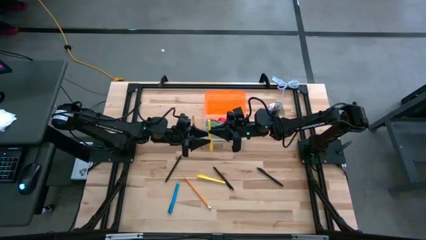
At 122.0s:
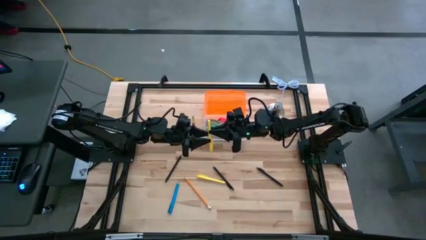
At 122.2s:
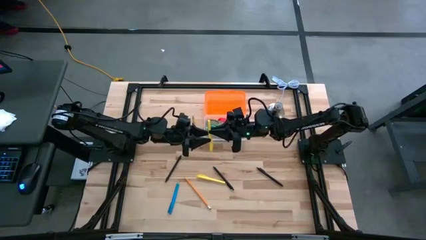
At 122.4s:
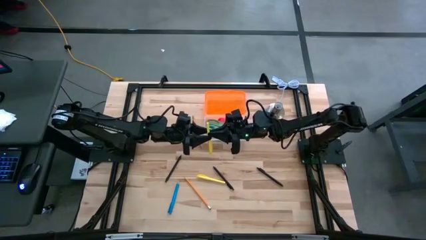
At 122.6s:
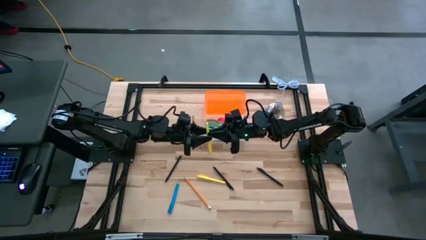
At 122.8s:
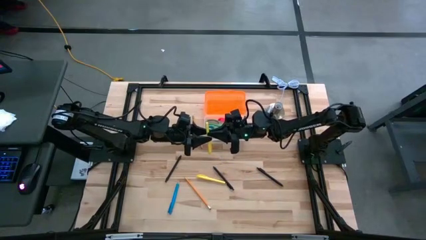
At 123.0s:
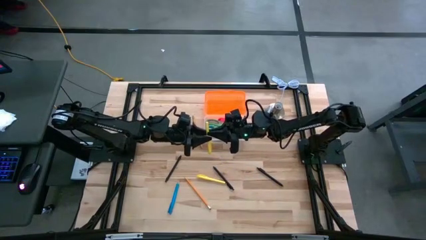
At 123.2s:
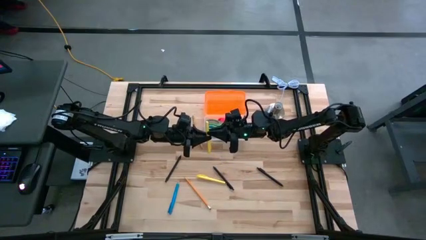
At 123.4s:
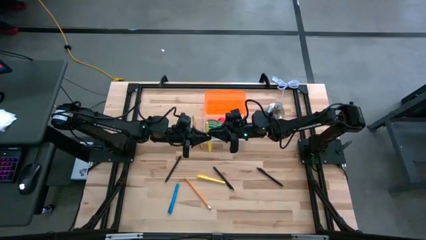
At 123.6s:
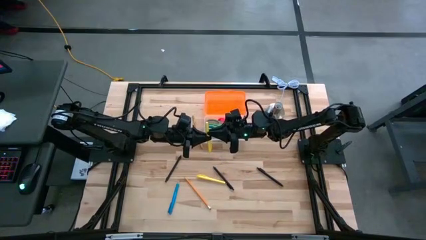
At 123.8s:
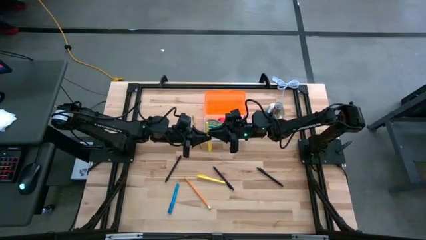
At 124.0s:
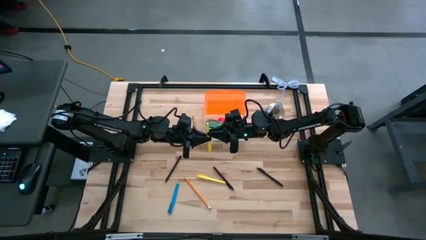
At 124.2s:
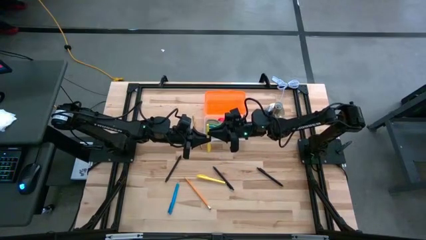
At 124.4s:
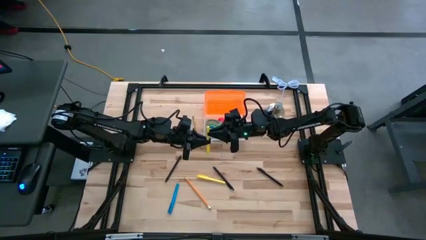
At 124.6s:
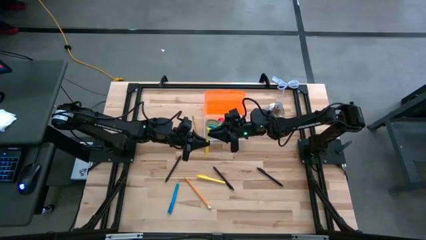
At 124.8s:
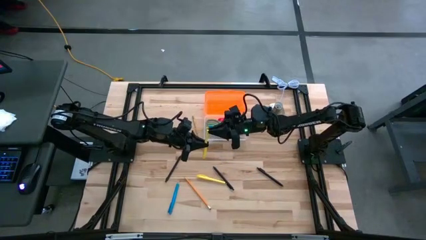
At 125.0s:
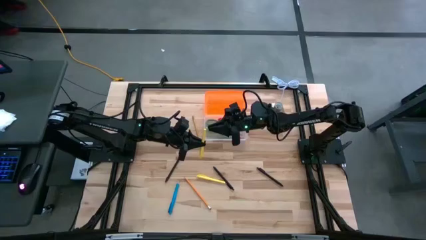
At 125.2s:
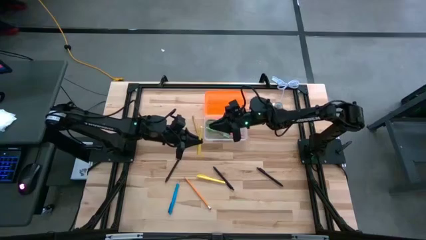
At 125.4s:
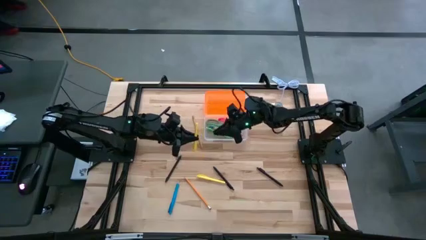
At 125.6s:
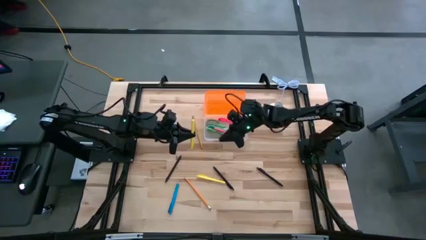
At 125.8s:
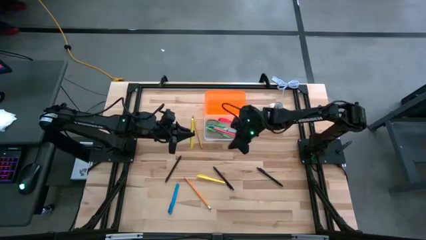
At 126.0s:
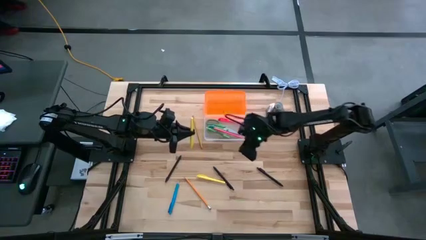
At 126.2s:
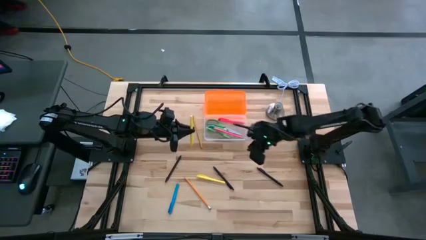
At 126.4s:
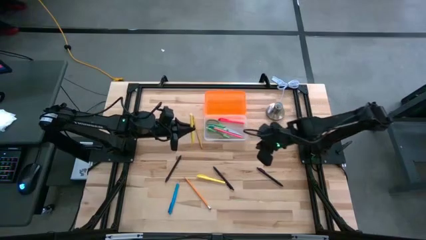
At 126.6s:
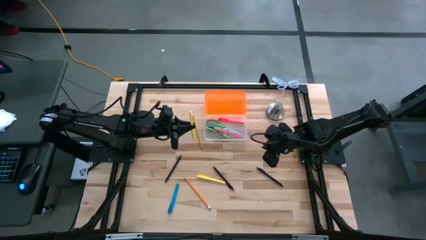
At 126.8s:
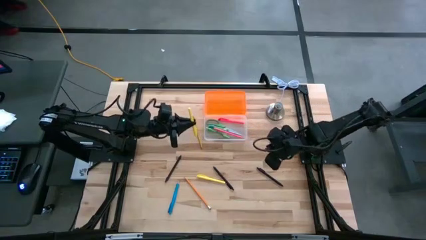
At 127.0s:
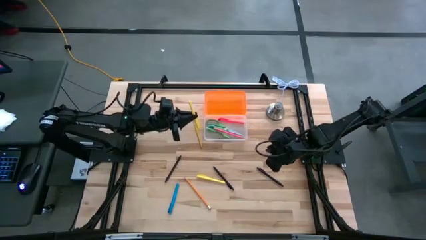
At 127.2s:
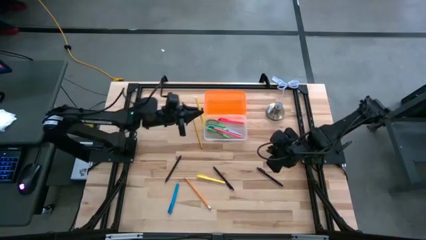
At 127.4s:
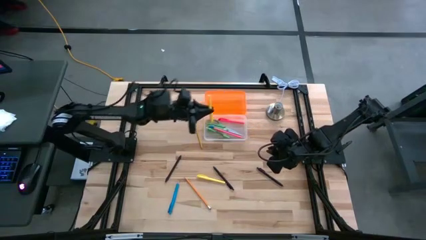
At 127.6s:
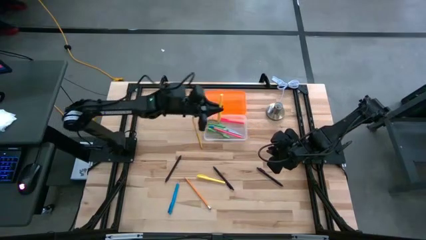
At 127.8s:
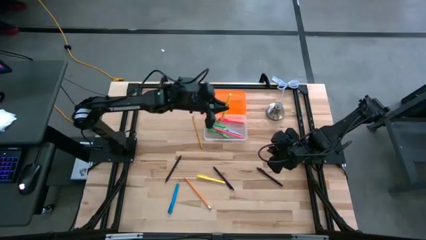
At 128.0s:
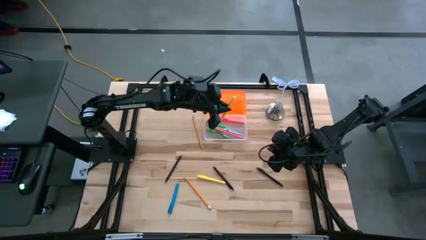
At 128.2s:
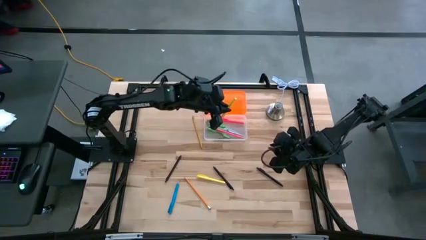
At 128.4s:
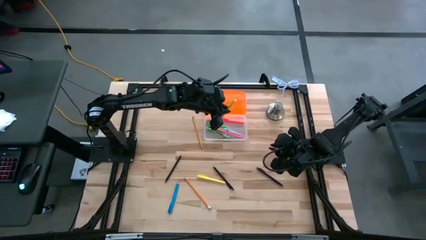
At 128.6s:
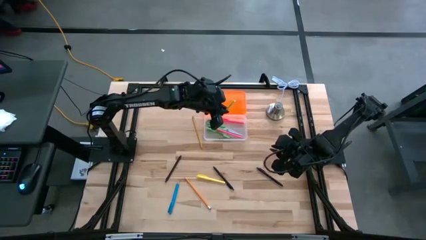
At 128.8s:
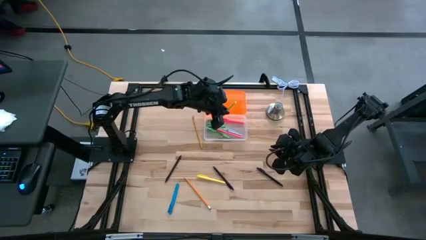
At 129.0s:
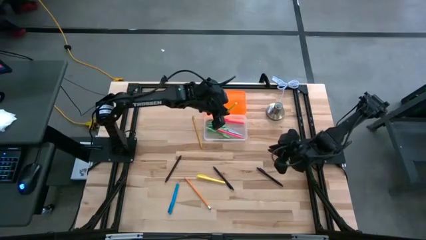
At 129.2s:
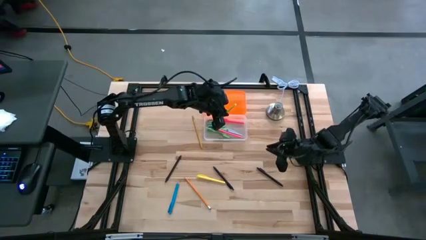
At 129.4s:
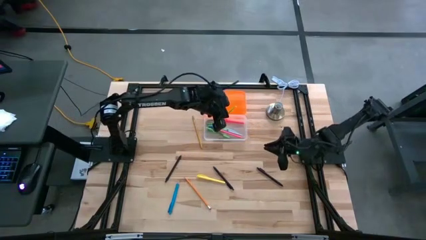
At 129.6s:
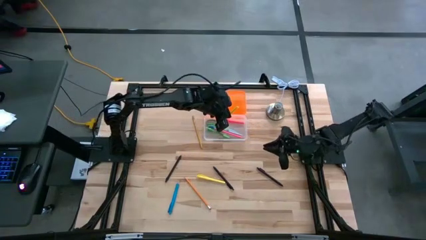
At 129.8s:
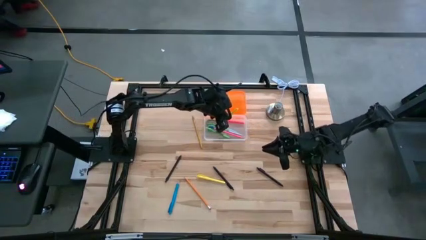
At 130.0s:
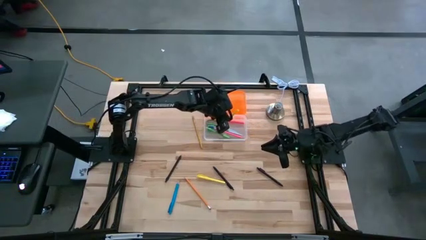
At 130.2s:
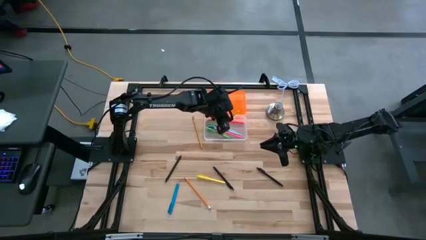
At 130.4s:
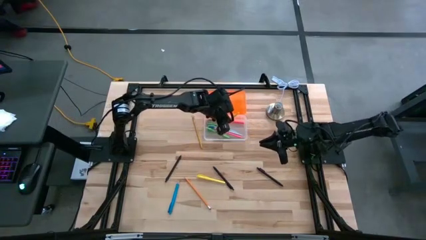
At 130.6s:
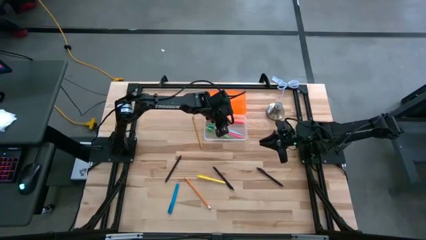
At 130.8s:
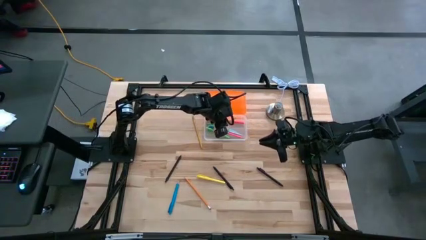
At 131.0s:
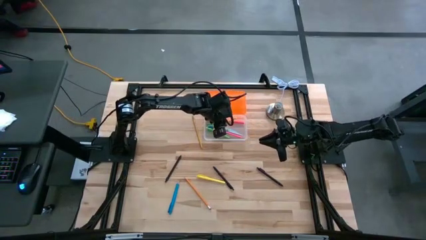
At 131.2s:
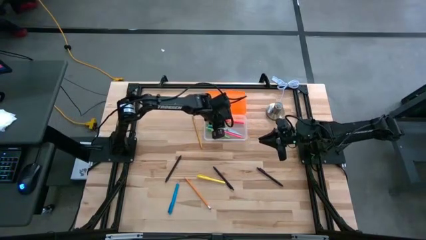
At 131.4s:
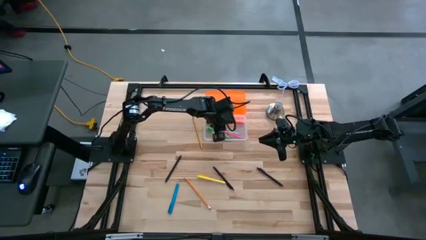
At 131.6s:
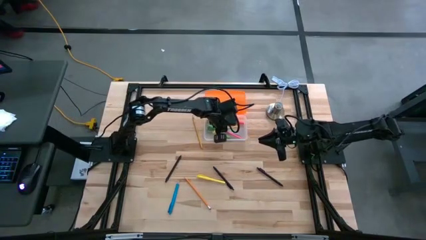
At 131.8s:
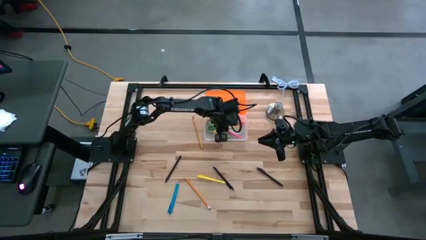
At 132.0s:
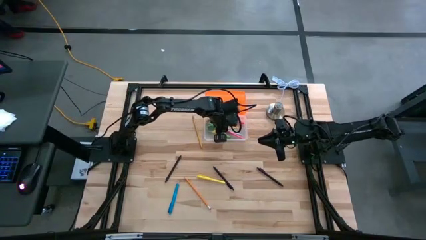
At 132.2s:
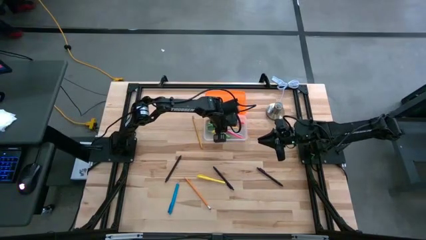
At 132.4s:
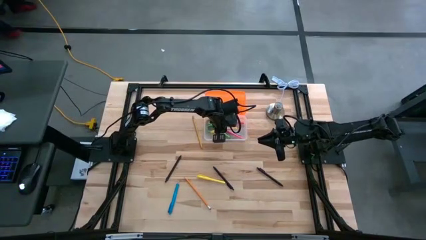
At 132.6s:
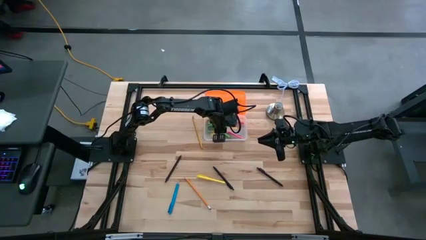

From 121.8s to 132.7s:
Task: Pick & place school supplies into a supply box
Put the right yellow highlighter into the supply box

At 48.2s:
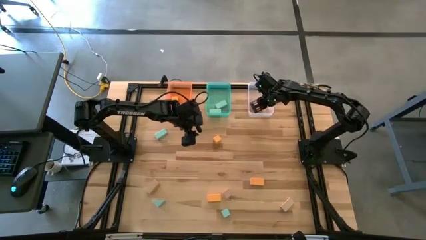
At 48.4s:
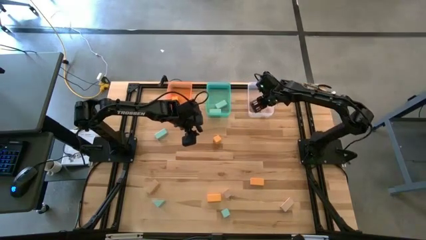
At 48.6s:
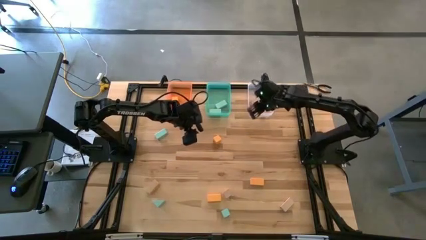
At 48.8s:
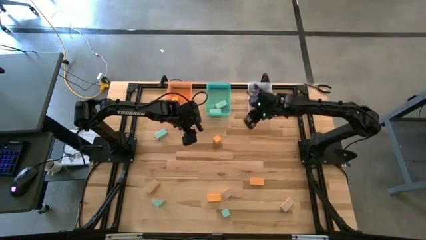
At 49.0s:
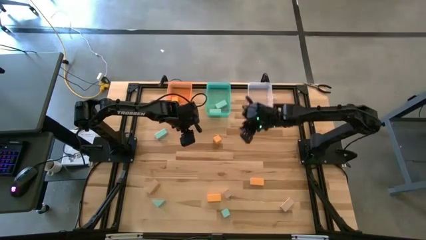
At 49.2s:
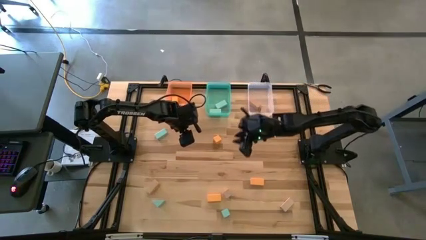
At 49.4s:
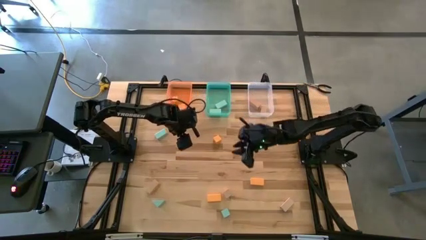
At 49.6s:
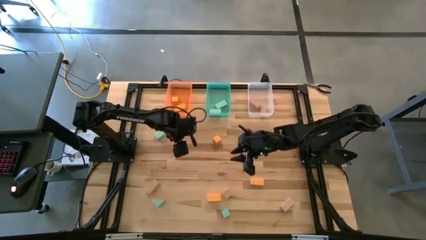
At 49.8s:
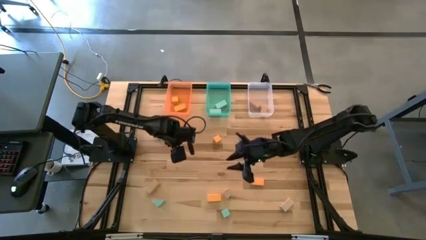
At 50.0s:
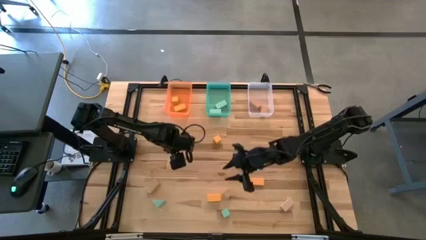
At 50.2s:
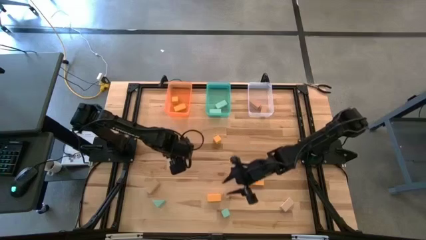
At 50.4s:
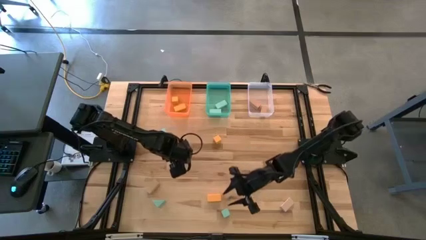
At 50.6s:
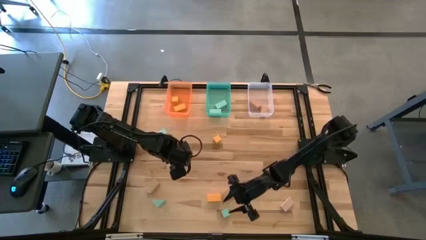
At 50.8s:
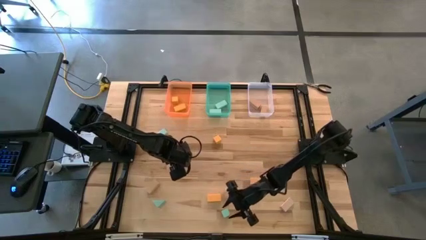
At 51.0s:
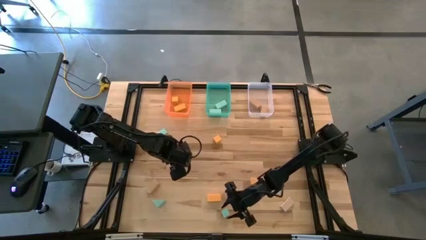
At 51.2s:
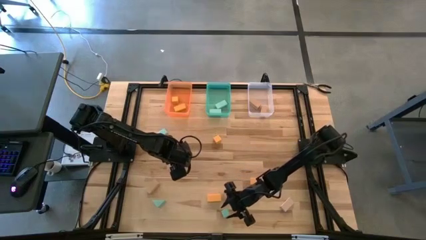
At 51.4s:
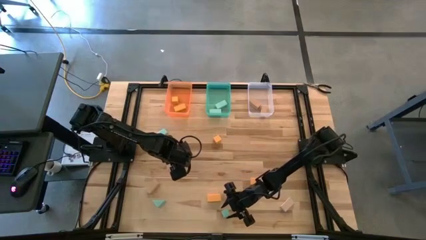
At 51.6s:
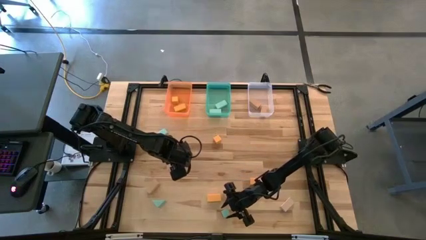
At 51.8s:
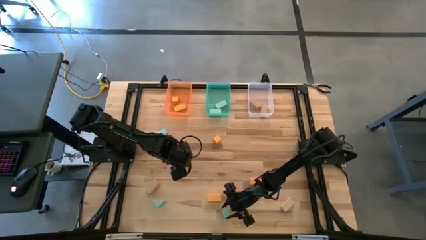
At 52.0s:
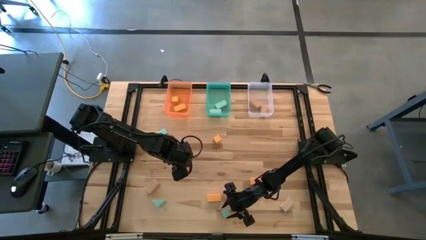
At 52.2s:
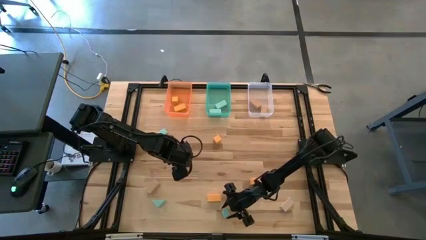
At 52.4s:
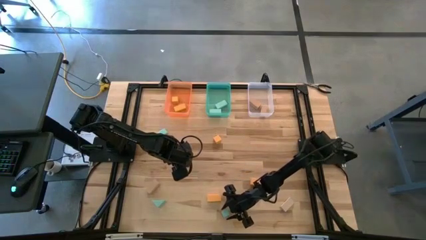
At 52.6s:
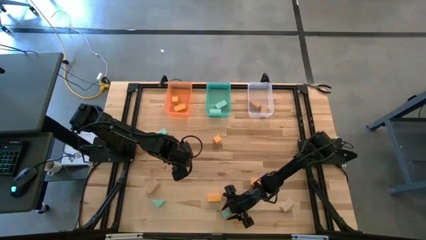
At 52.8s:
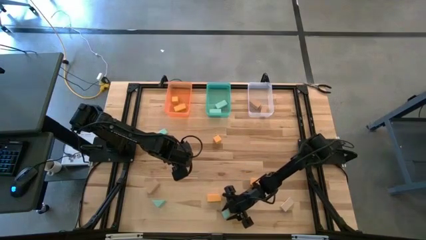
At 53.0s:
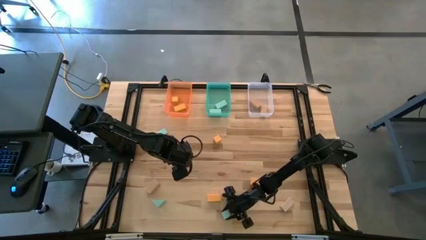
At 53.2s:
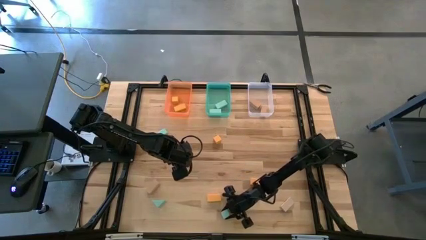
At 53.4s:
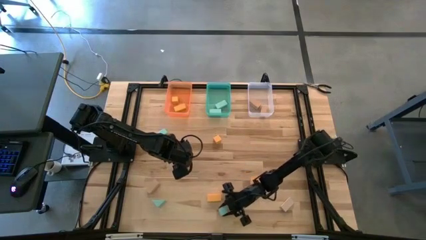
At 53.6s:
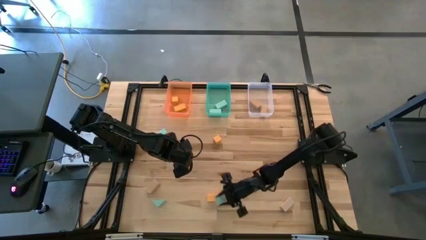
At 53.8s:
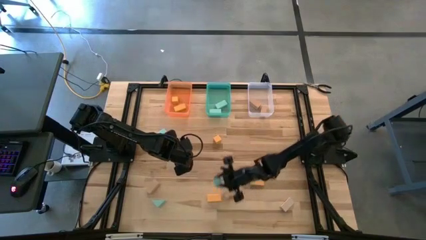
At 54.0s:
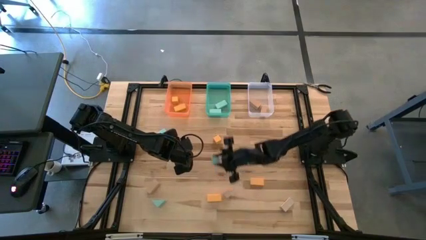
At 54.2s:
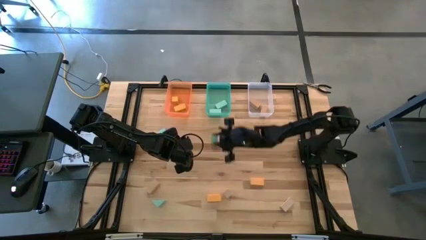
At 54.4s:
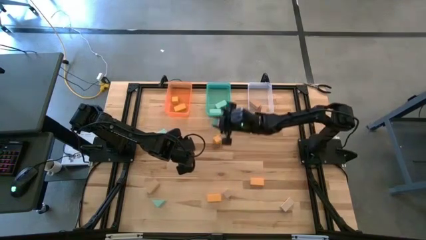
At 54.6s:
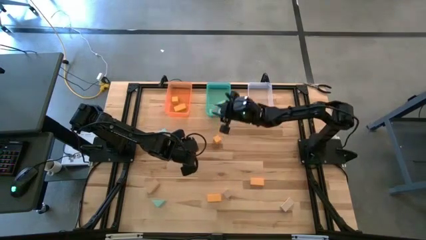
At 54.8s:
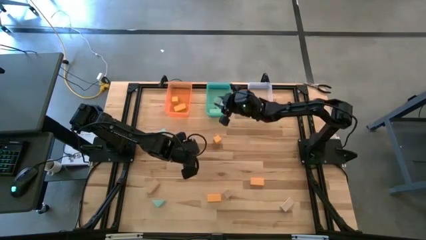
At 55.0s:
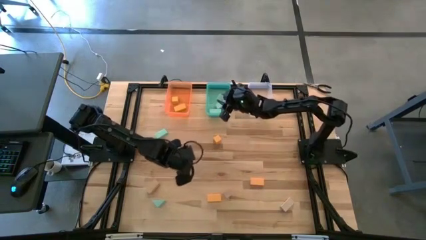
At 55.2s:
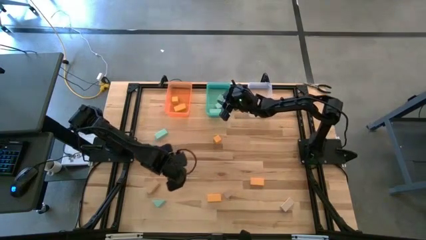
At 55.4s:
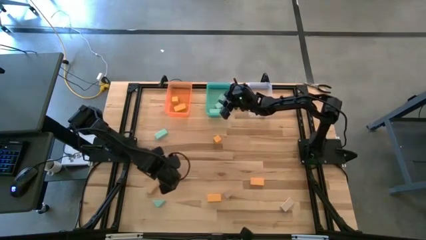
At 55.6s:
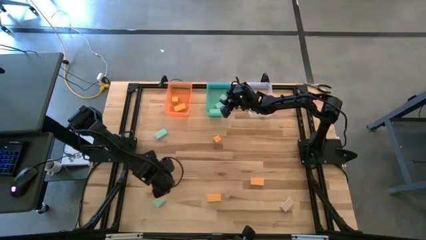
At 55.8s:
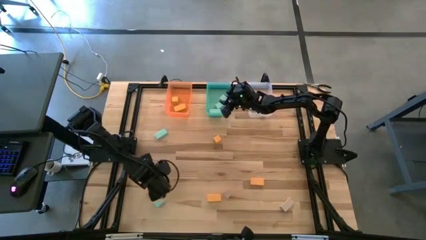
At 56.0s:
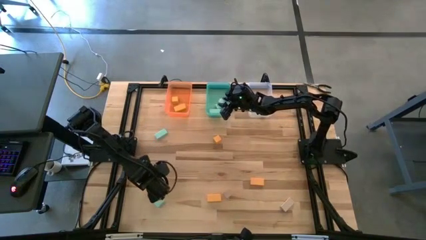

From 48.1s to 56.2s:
Task: Sort & place blocks by color
Put the blue block into the blue bin
